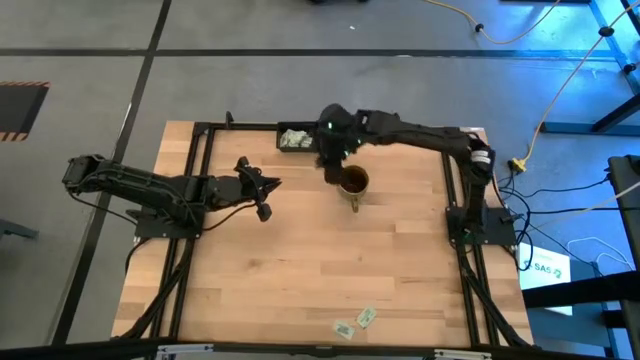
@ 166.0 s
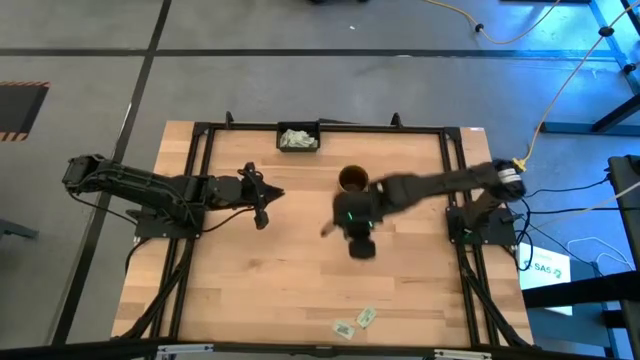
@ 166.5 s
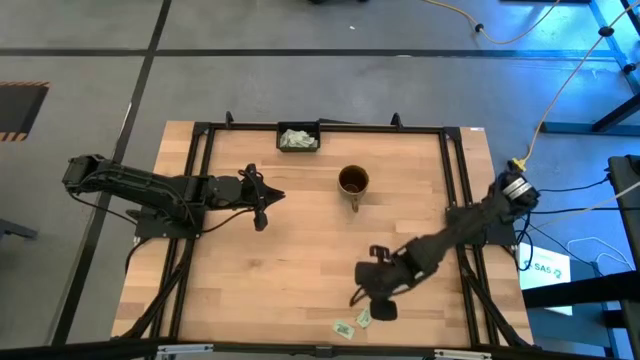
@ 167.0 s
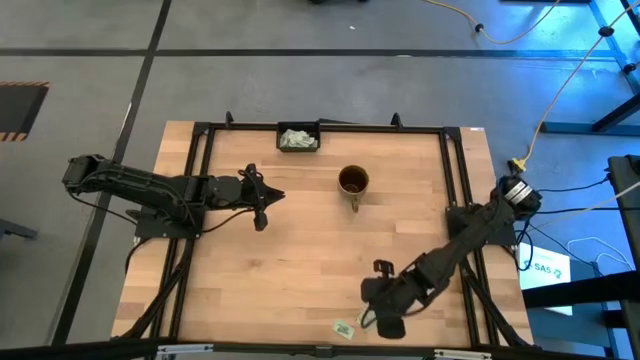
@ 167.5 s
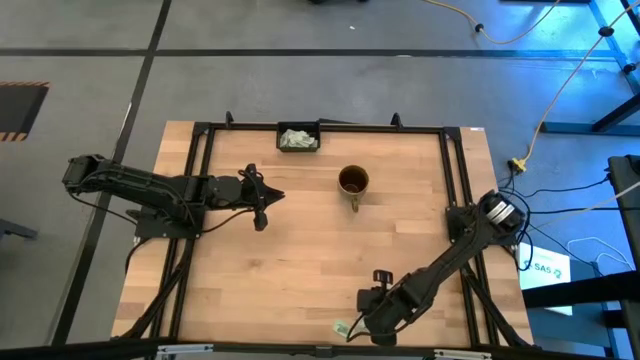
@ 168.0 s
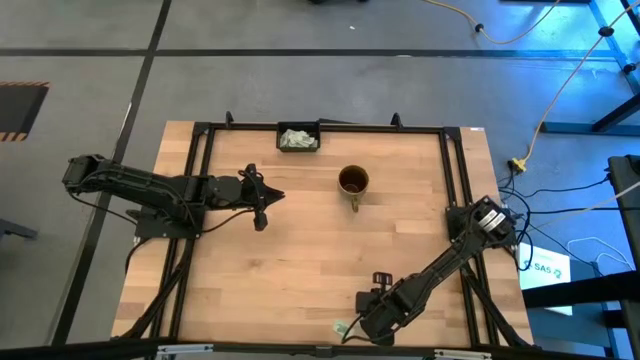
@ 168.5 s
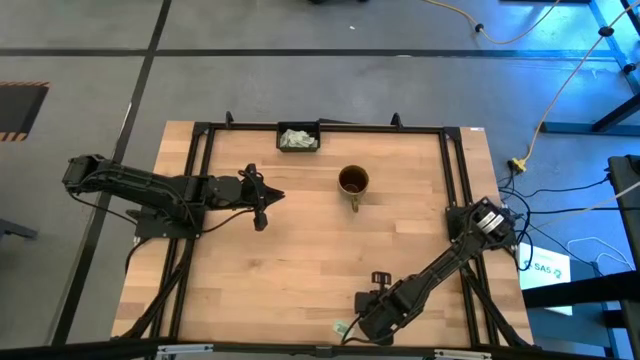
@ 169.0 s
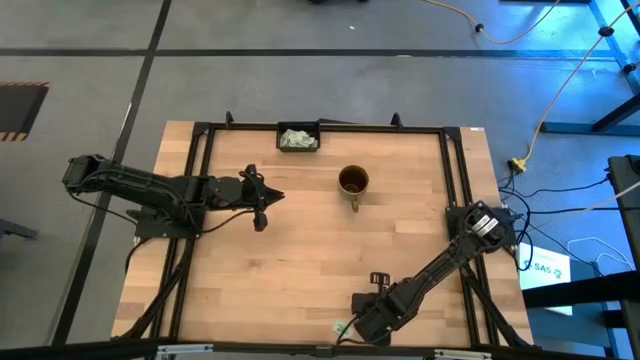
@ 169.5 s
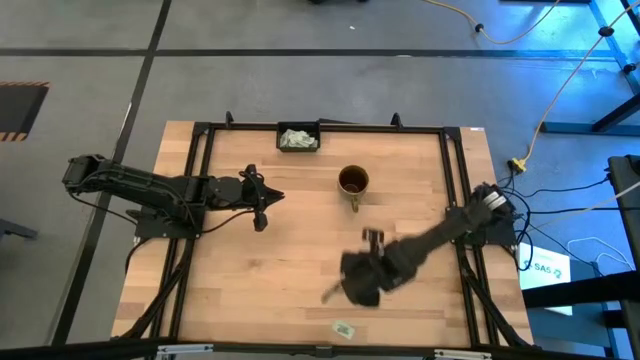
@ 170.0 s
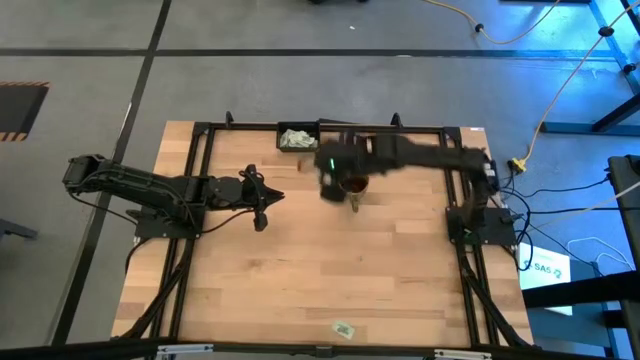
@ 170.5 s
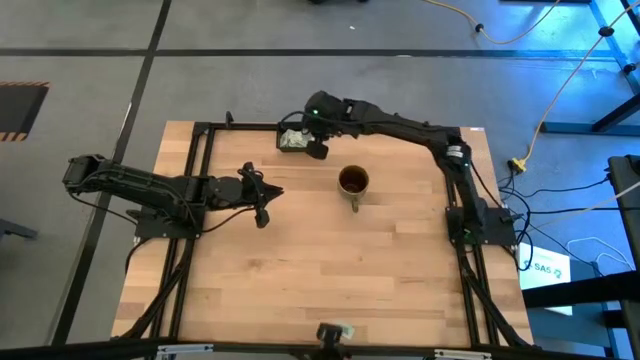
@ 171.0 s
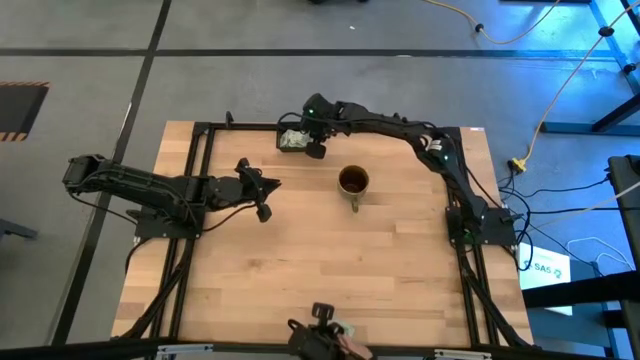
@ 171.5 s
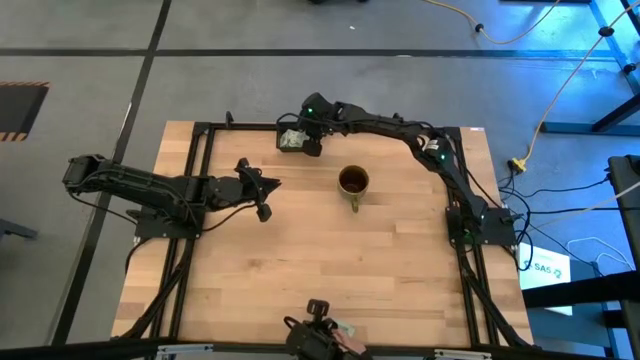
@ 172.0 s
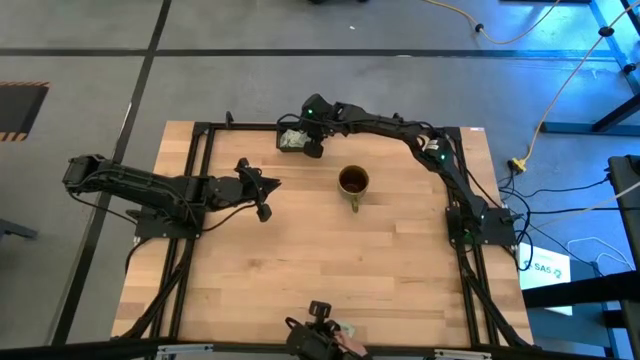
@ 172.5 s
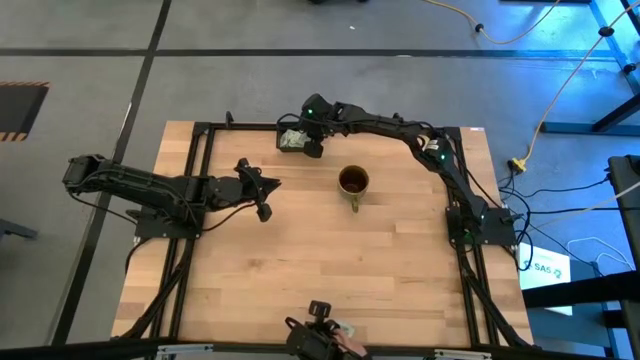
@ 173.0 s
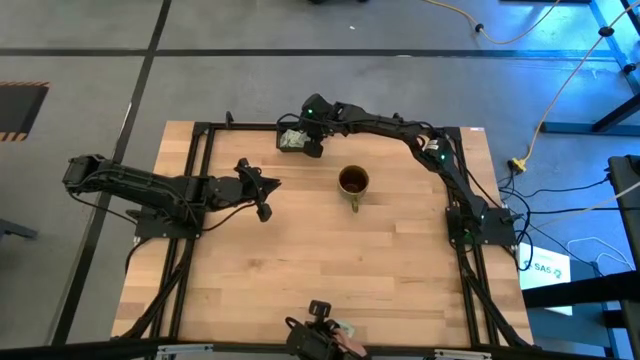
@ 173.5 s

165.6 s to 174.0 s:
Task: Pick and place Stevia / Truvia into bins
Put the stevia packet into the black container

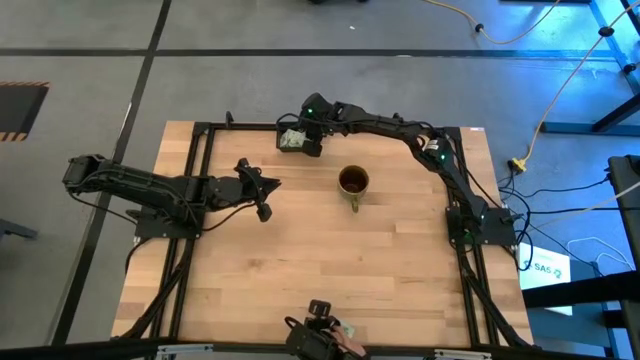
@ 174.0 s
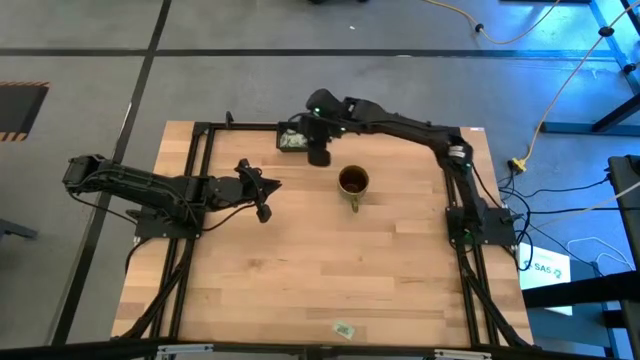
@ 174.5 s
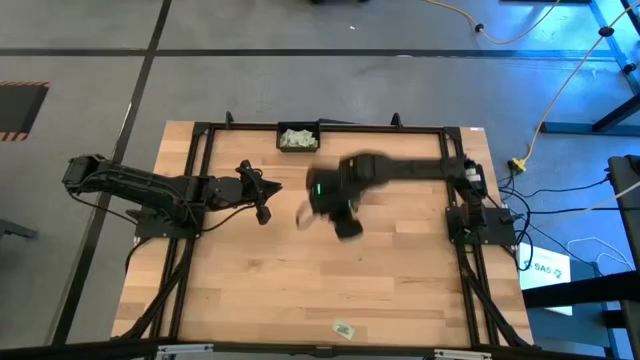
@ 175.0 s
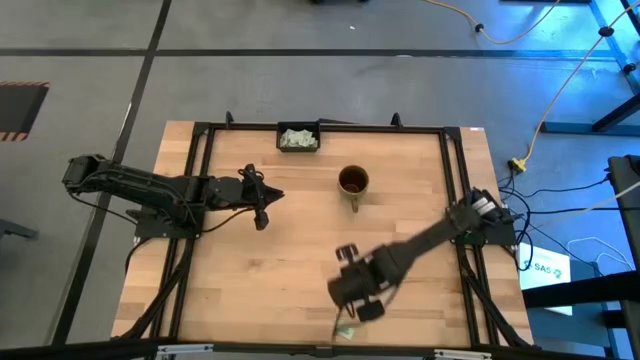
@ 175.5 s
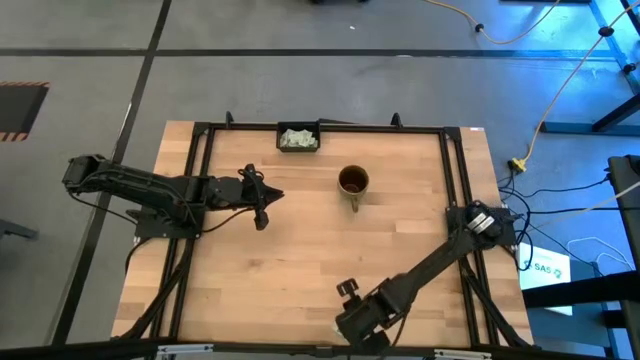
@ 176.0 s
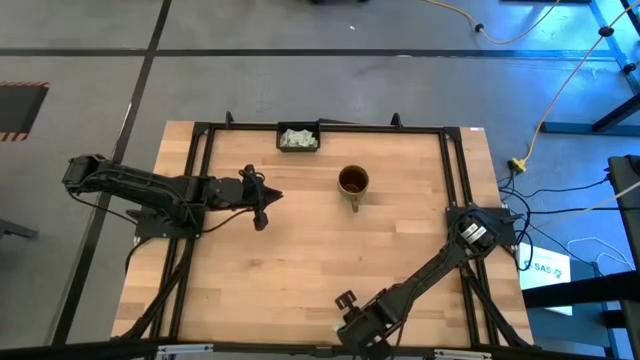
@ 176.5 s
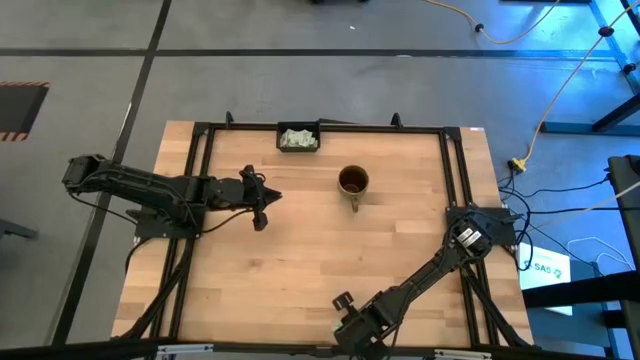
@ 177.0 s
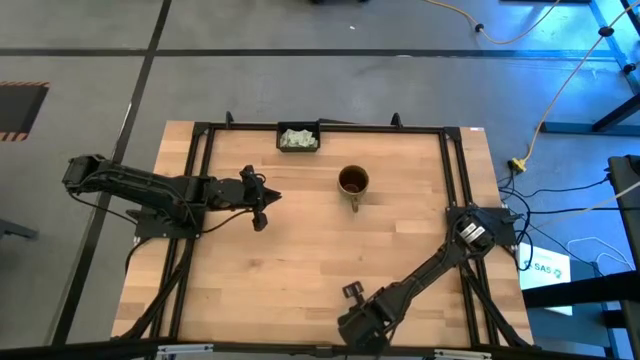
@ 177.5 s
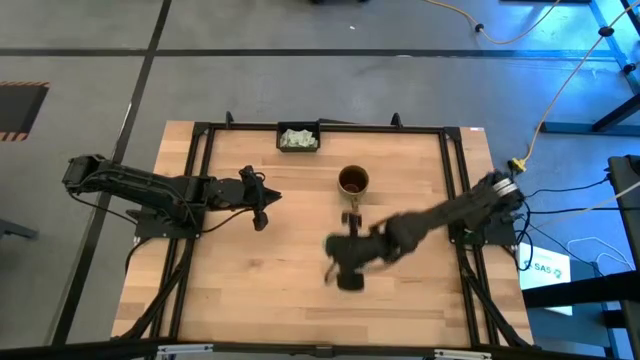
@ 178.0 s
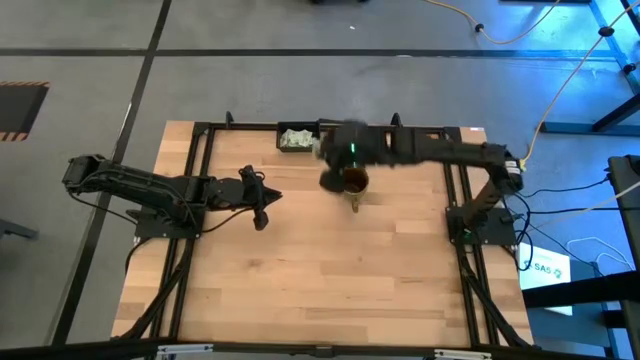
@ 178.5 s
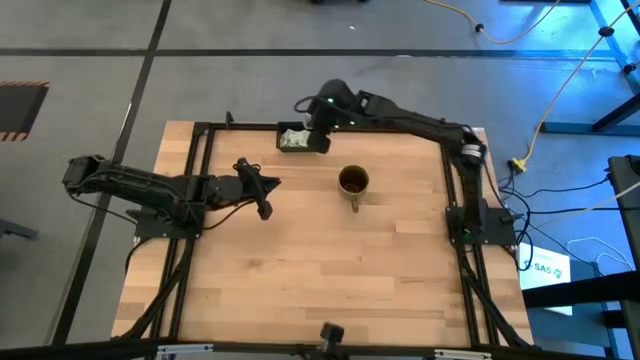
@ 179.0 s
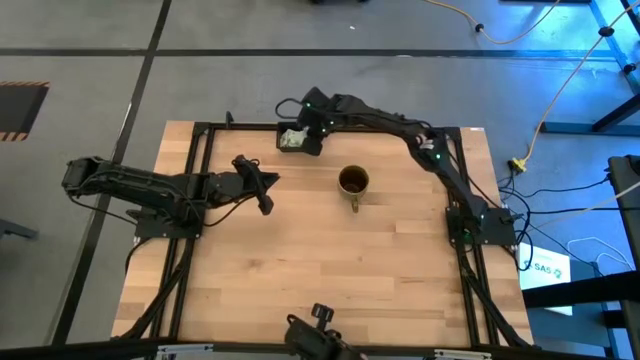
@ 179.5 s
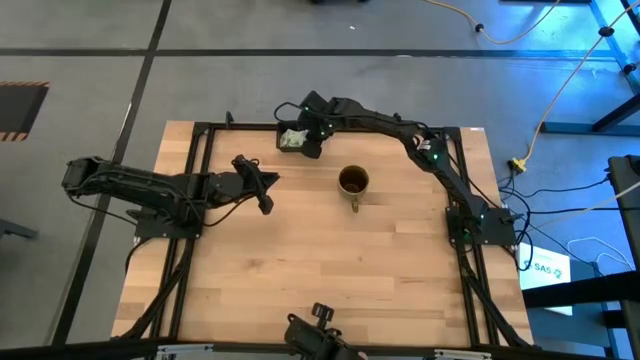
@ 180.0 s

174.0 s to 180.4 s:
Put the stevia packet into the black container

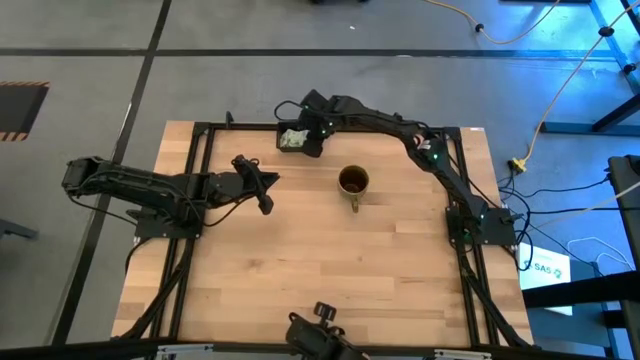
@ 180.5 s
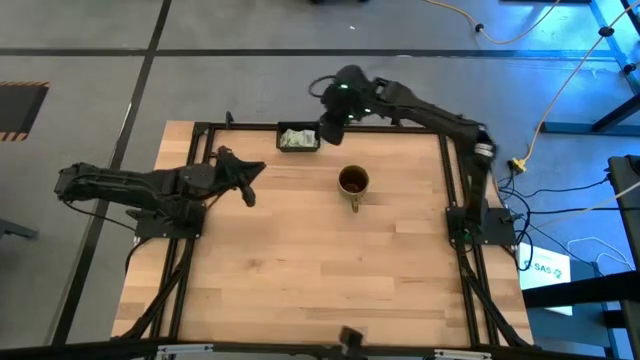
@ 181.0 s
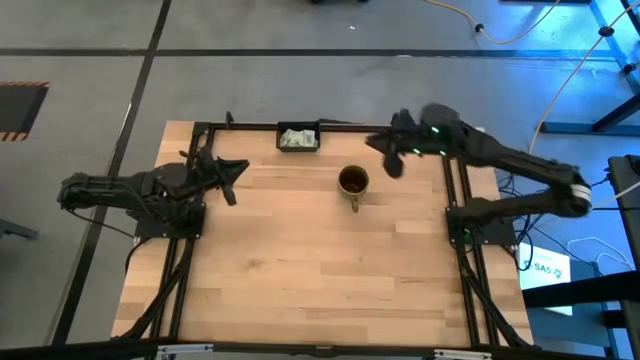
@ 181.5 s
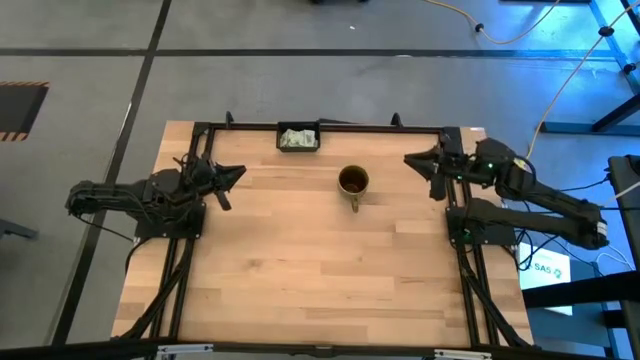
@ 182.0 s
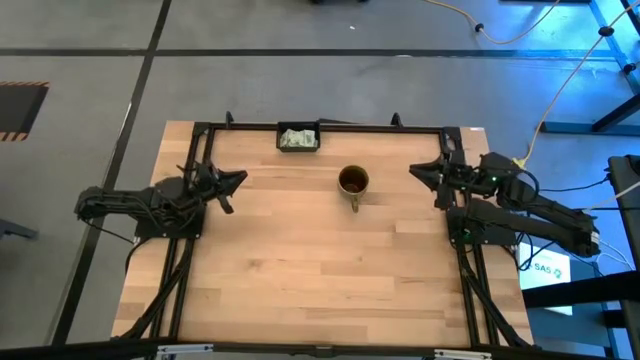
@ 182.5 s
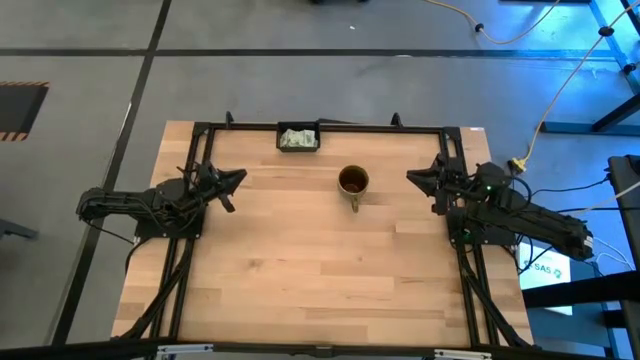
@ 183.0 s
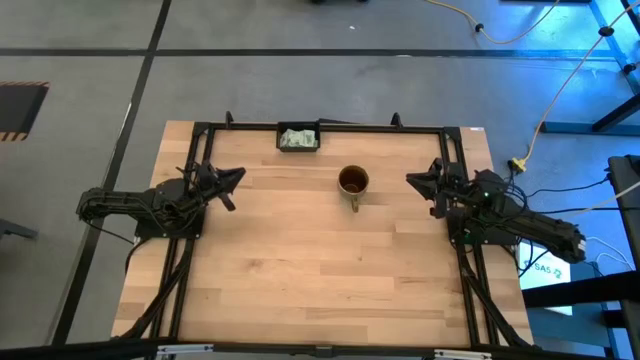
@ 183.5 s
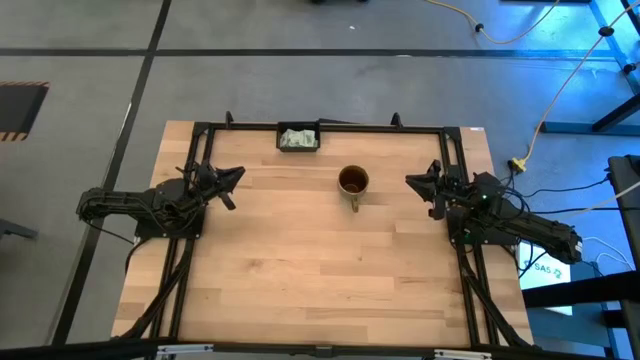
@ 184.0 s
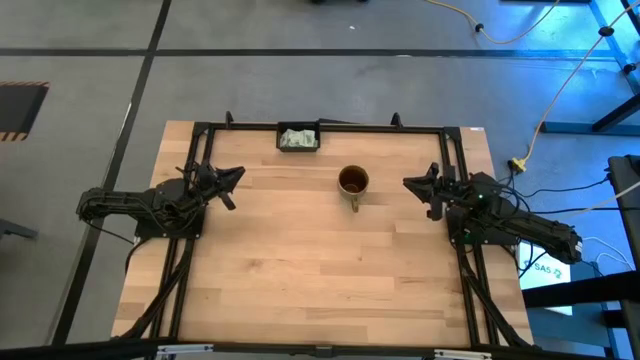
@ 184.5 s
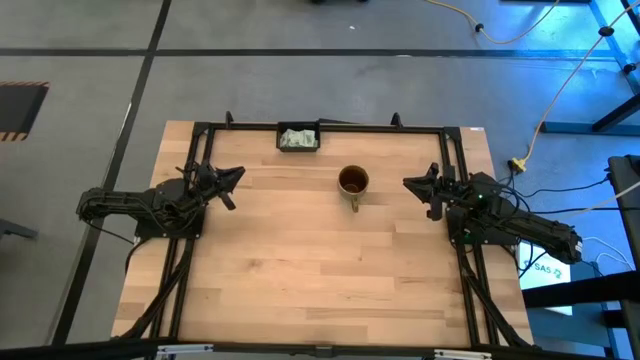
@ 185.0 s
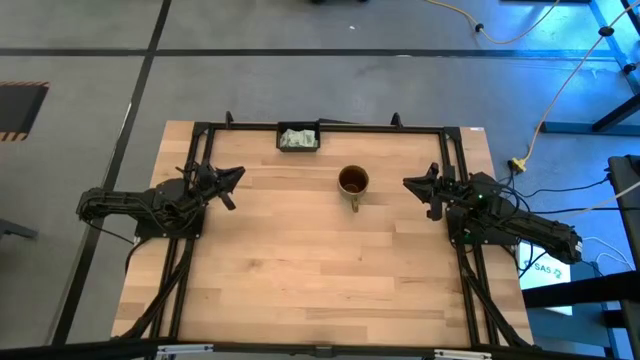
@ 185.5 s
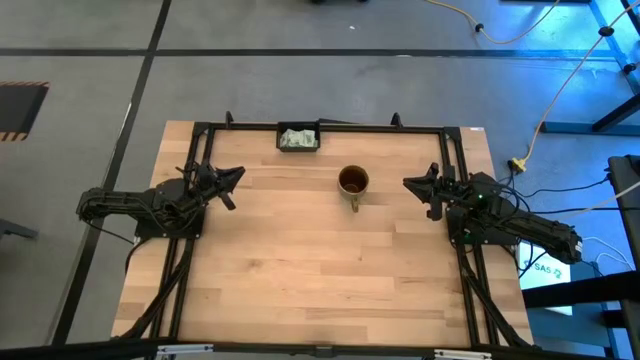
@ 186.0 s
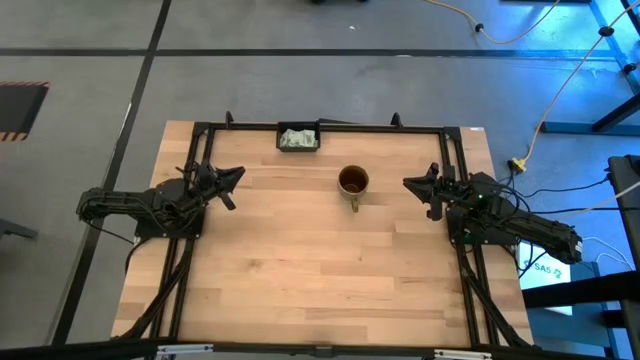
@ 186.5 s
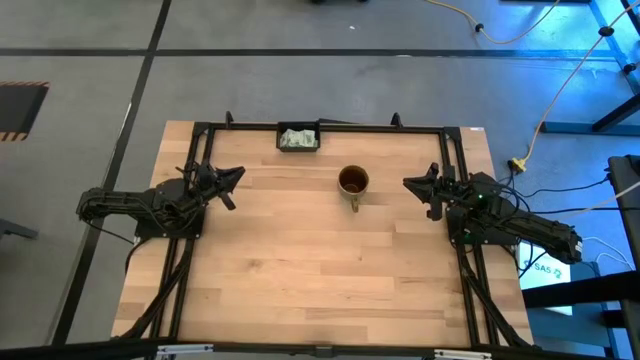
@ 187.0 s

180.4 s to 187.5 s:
Return to Home Position
